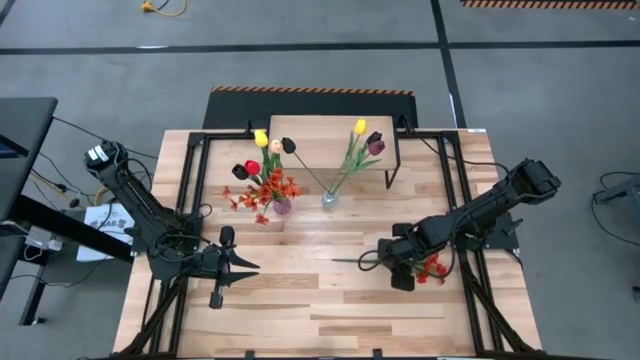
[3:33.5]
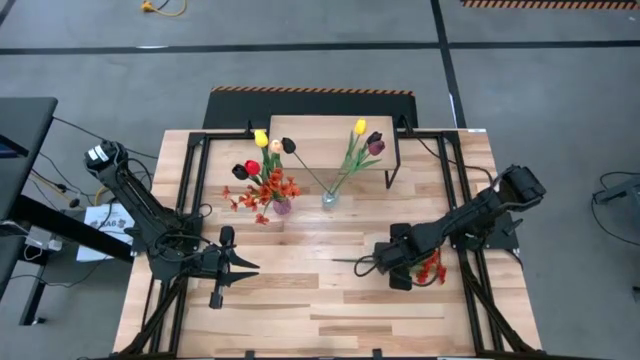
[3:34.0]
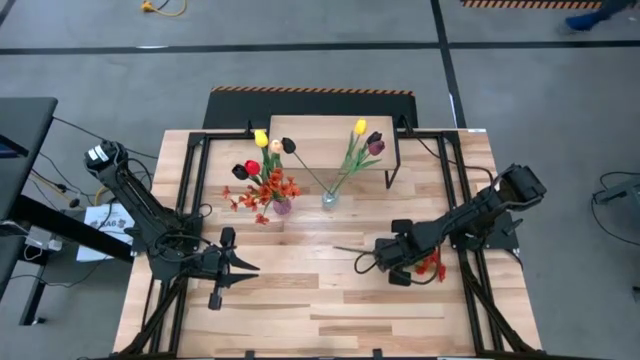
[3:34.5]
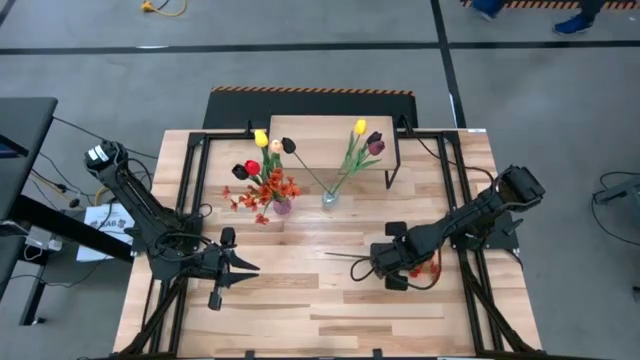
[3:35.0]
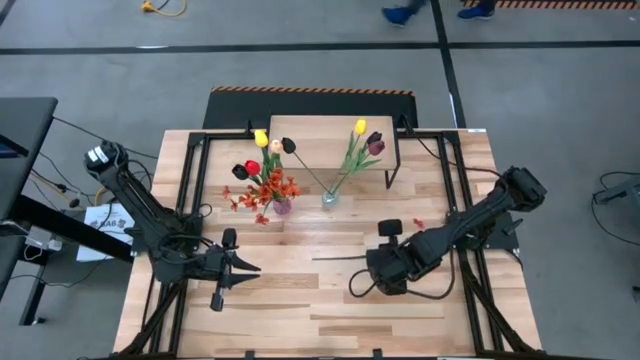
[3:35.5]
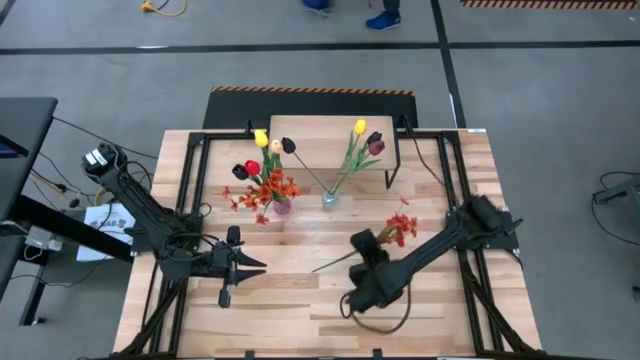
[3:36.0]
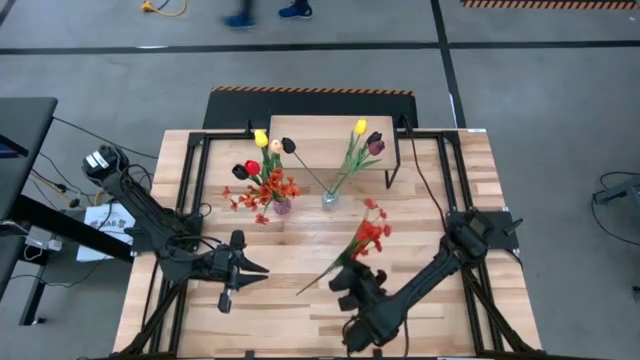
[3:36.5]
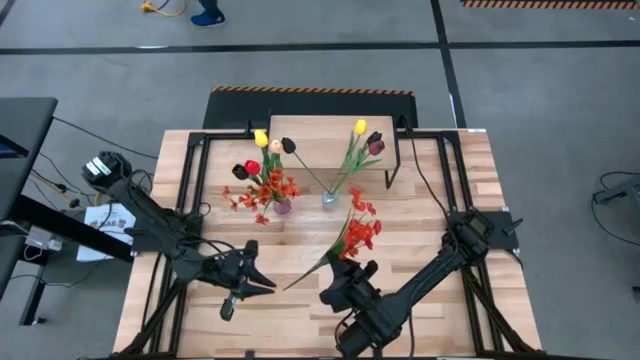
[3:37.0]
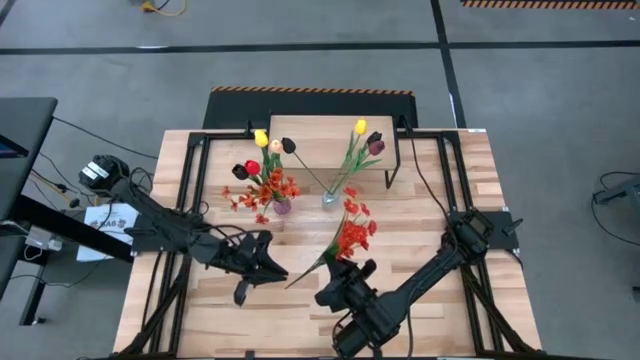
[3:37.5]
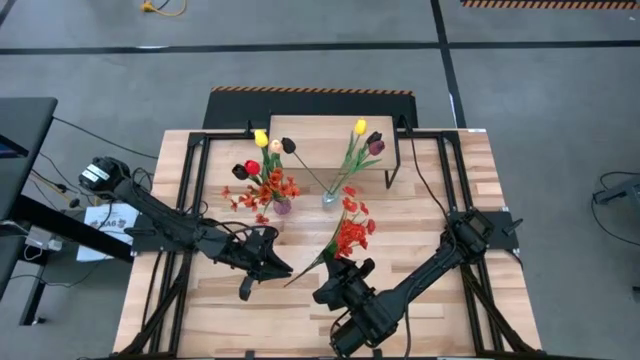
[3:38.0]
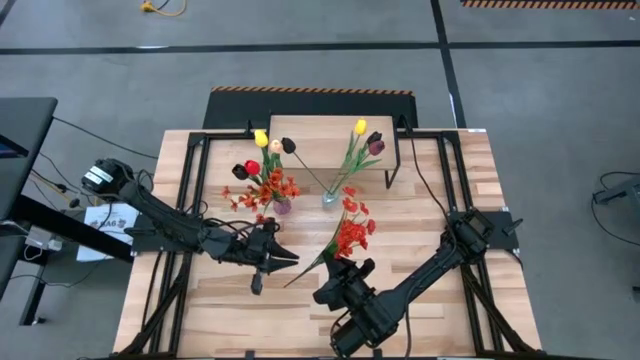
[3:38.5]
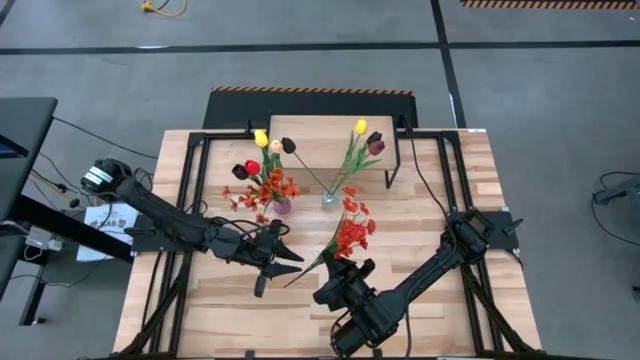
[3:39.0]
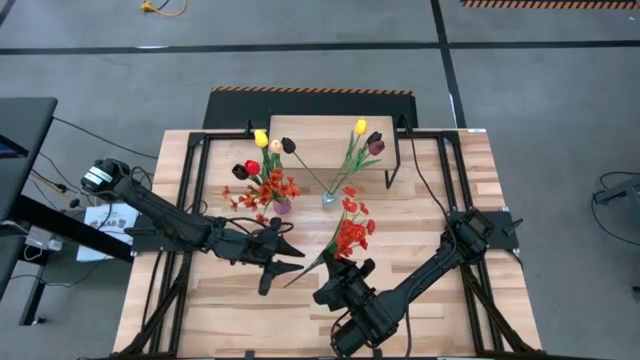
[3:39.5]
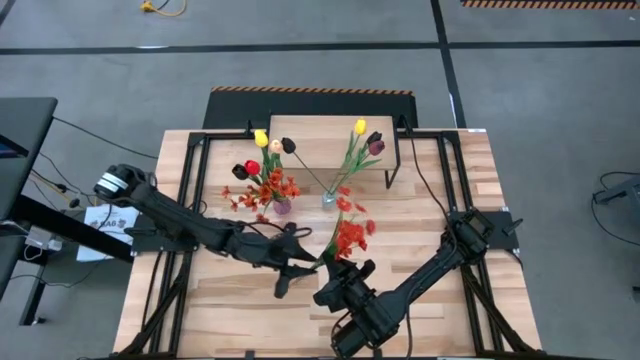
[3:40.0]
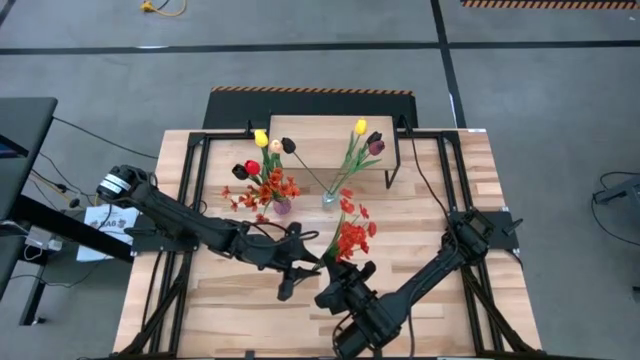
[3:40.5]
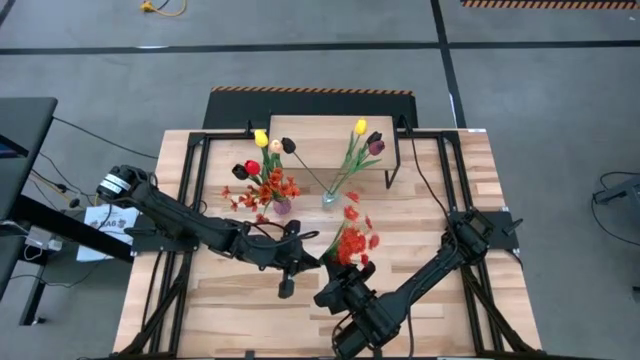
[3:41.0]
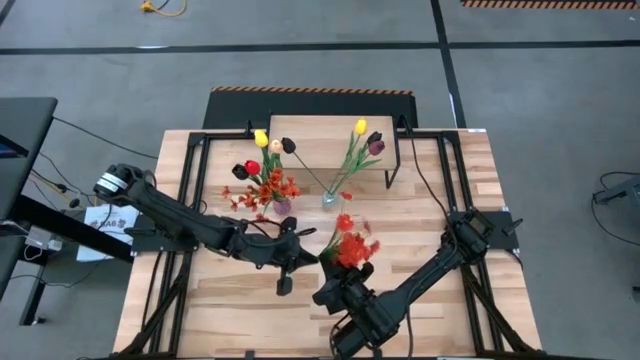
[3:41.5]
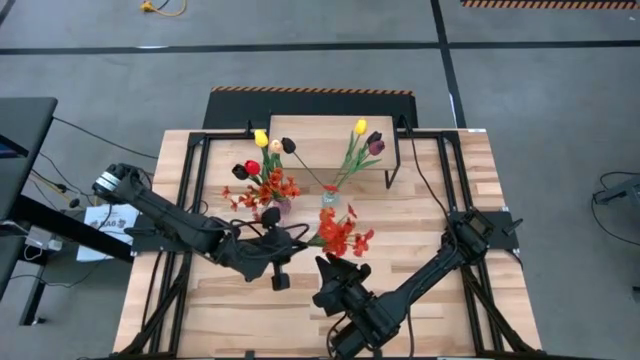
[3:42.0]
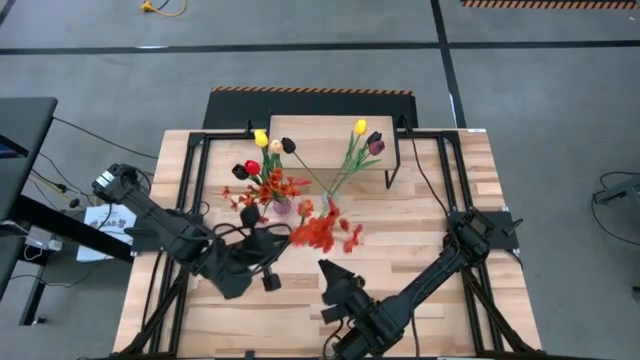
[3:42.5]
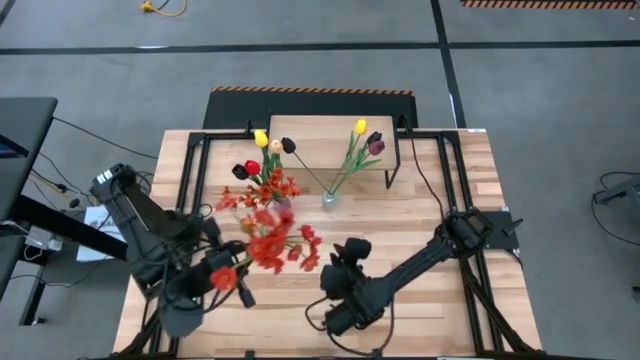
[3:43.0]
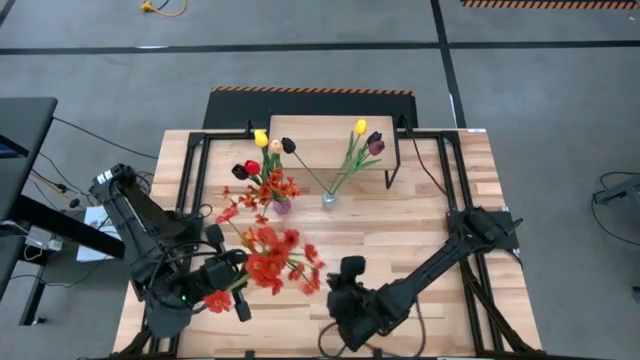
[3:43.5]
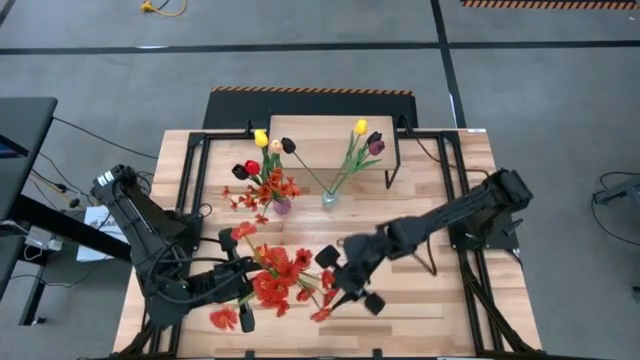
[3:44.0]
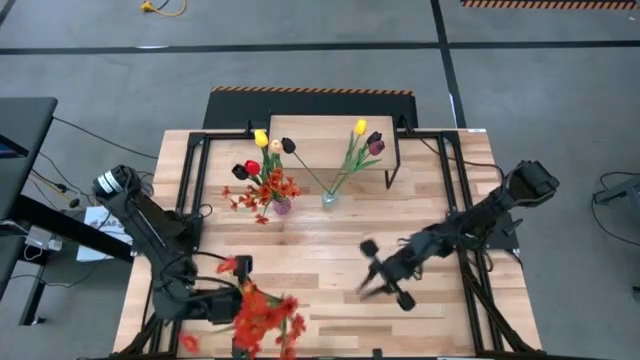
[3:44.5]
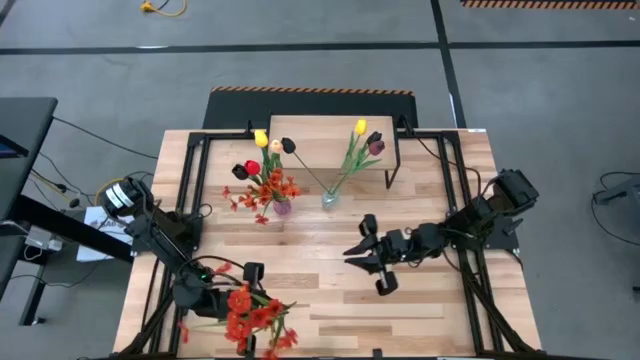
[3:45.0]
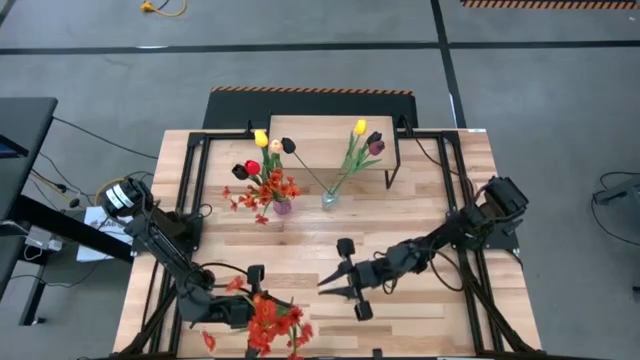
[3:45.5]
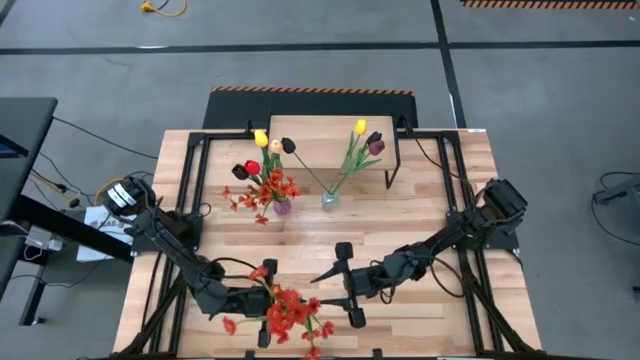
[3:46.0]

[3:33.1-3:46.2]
Task: Pick and place flowers into a vace then onto a shelf
Put the orange flower into the transparent vase

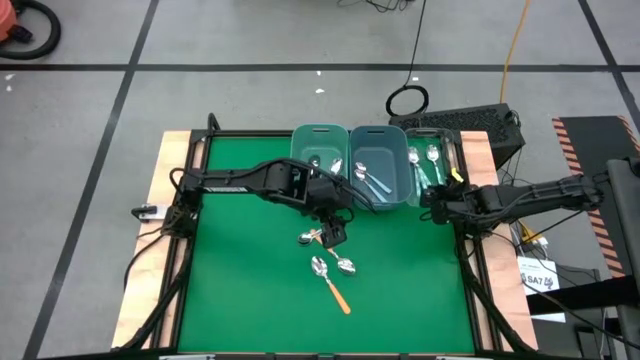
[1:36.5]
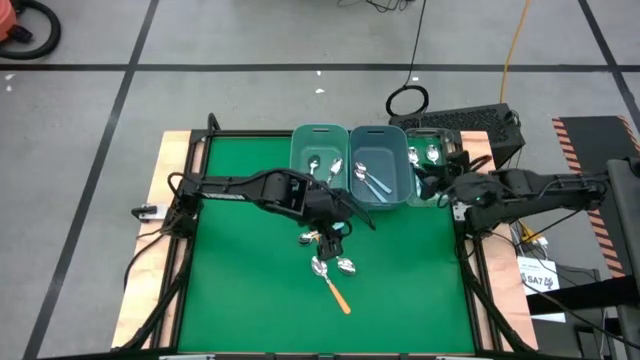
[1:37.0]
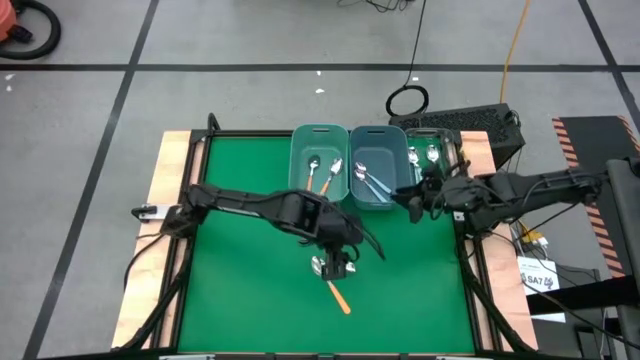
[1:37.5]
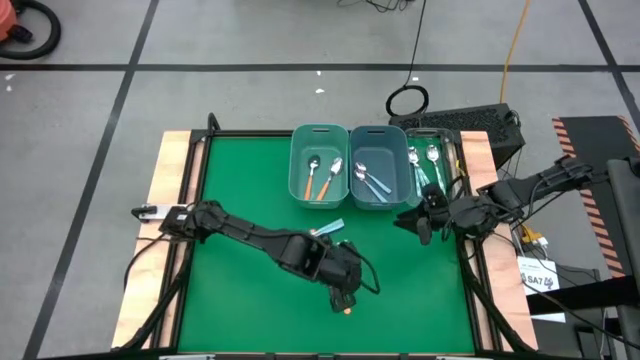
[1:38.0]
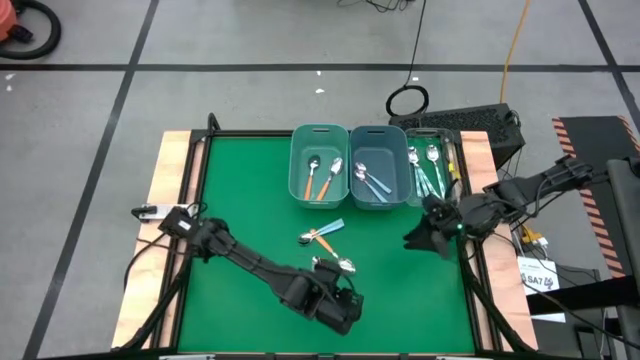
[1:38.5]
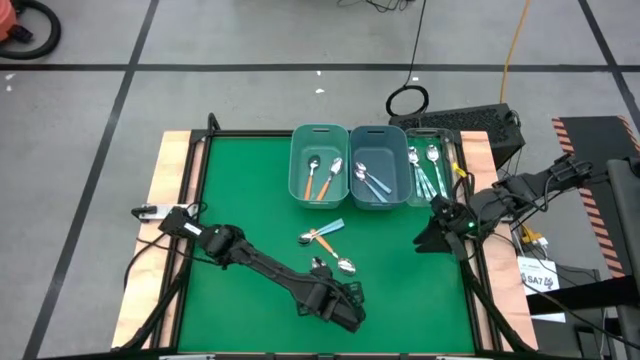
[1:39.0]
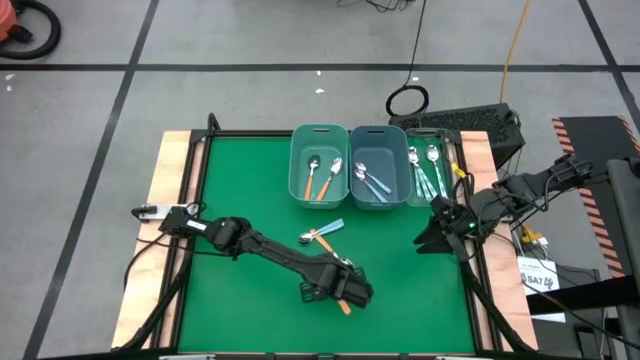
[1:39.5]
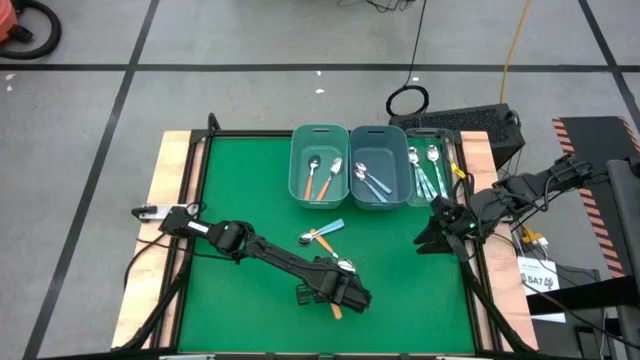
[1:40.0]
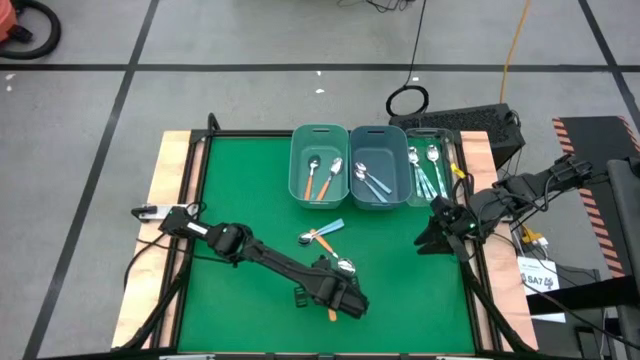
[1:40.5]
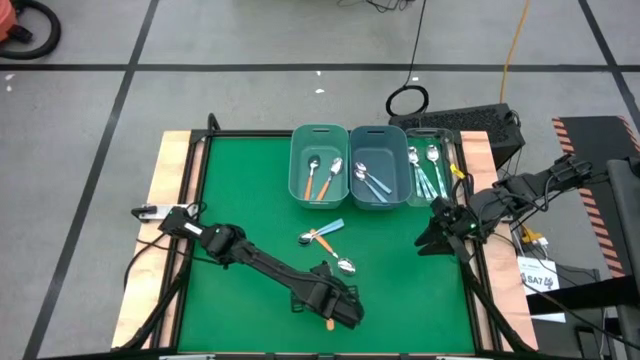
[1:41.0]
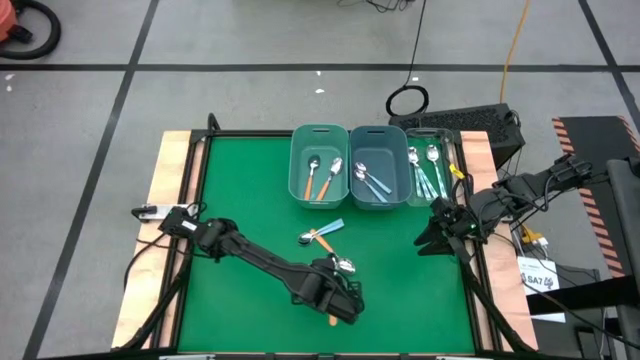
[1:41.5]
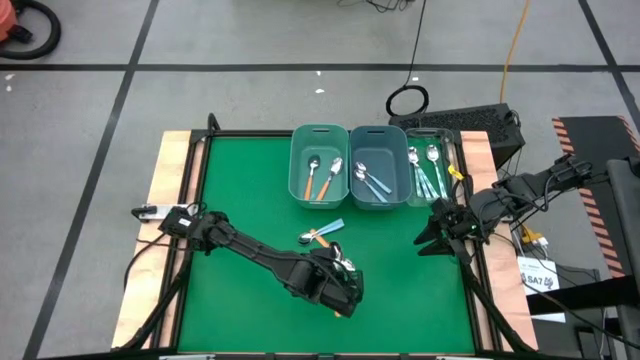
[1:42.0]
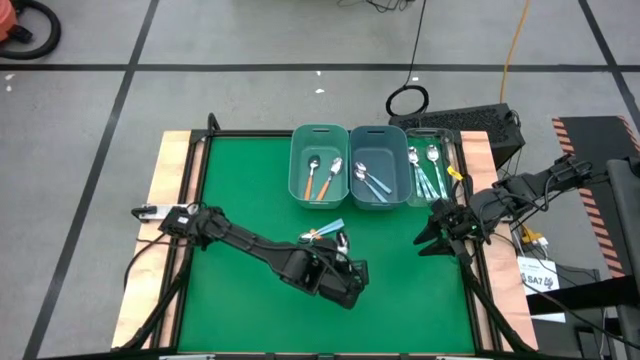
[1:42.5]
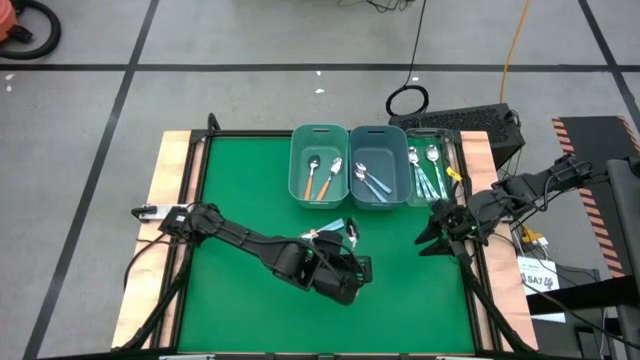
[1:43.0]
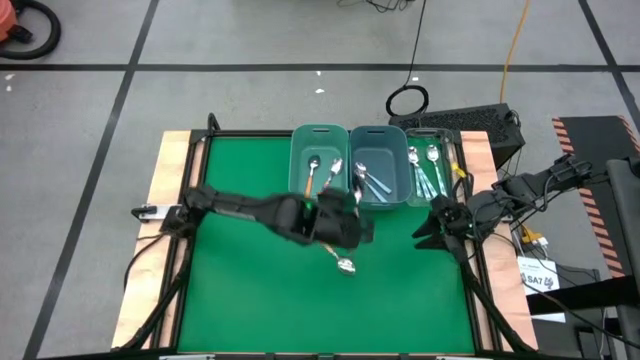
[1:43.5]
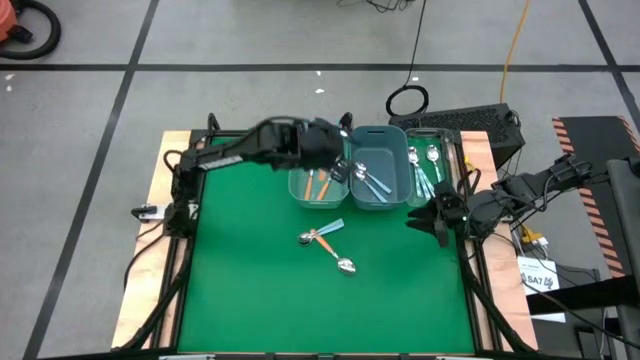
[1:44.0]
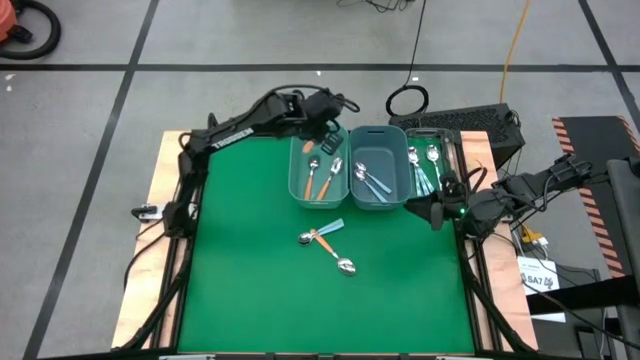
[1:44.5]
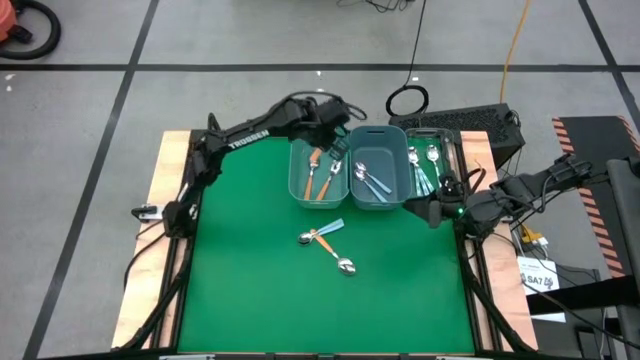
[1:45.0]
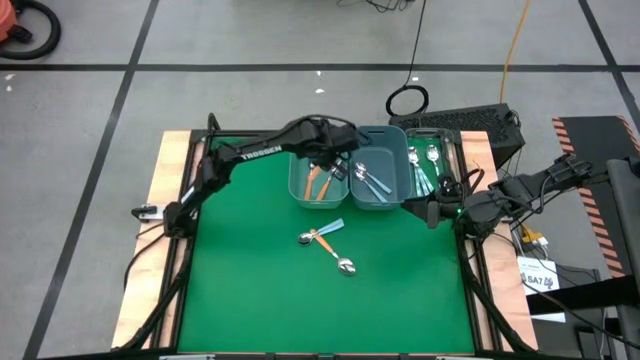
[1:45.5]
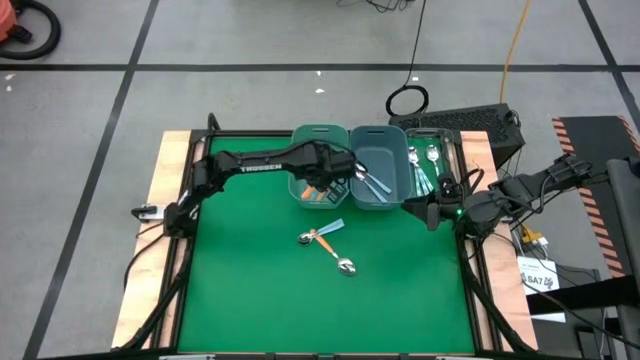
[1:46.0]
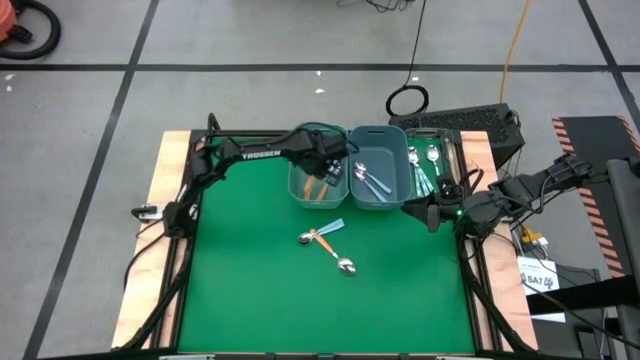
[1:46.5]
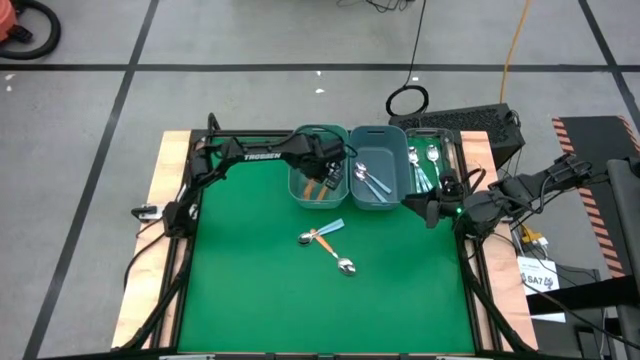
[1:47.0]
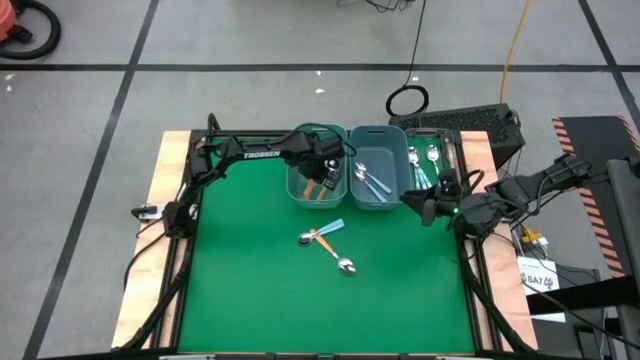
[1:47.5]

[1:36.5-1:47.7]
Task: Sort silverware by color (type)
Put the yellow spoon into the green bin
